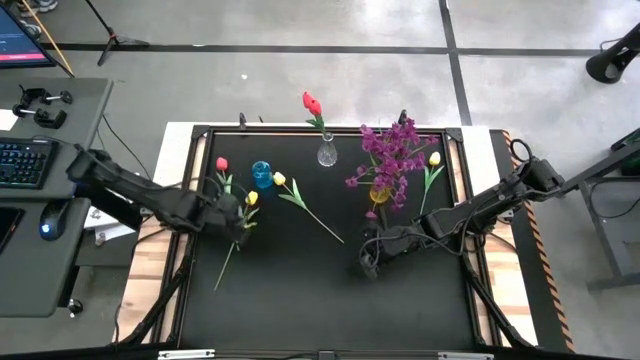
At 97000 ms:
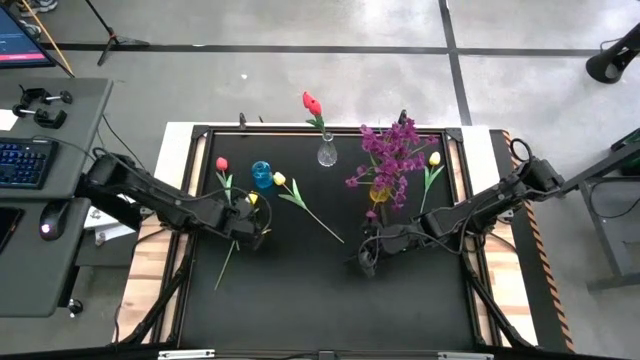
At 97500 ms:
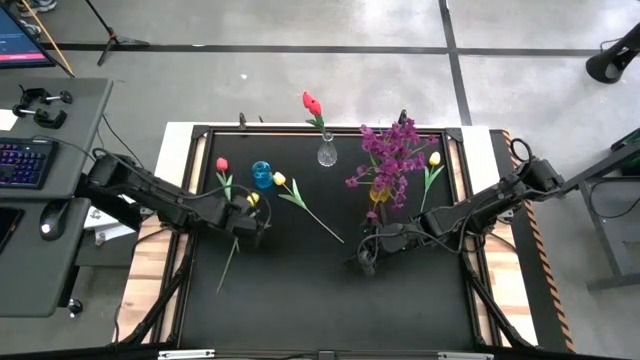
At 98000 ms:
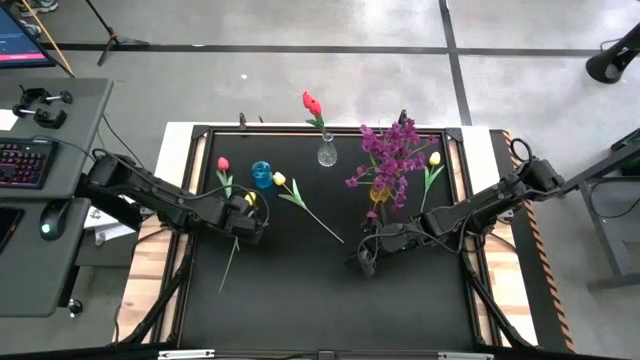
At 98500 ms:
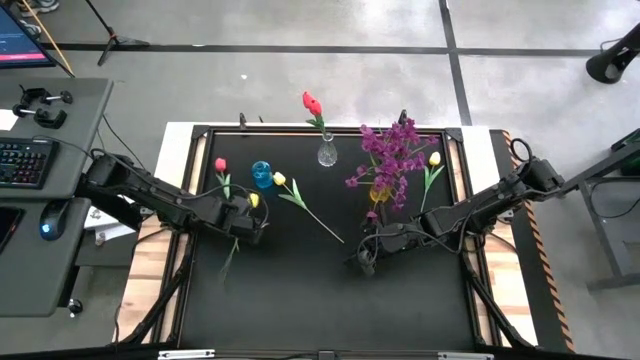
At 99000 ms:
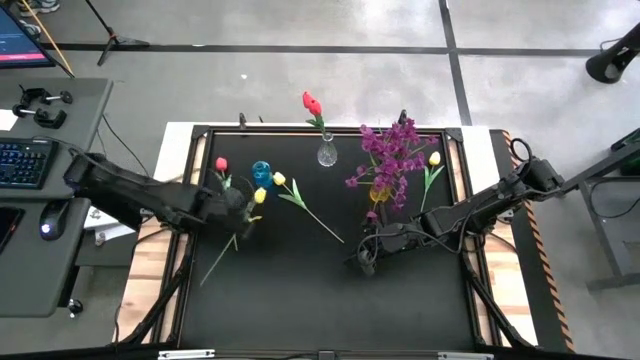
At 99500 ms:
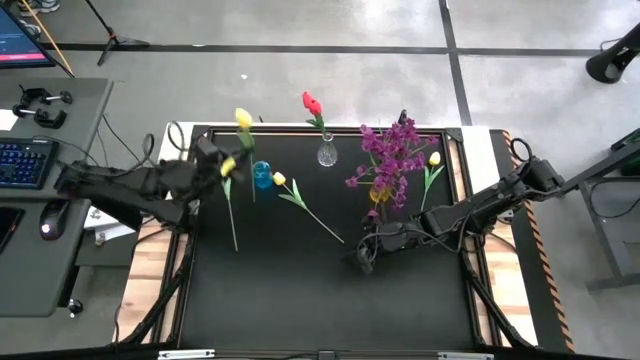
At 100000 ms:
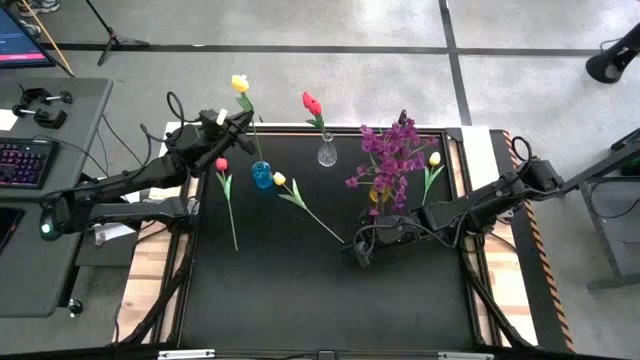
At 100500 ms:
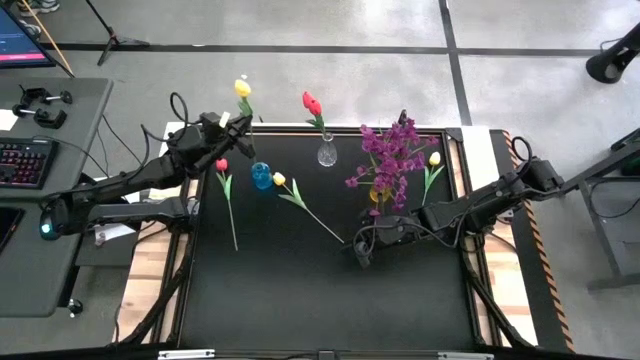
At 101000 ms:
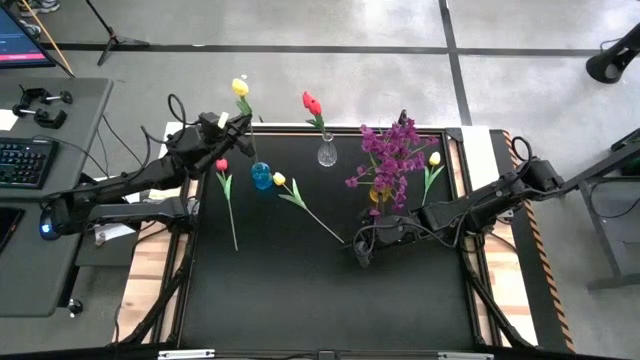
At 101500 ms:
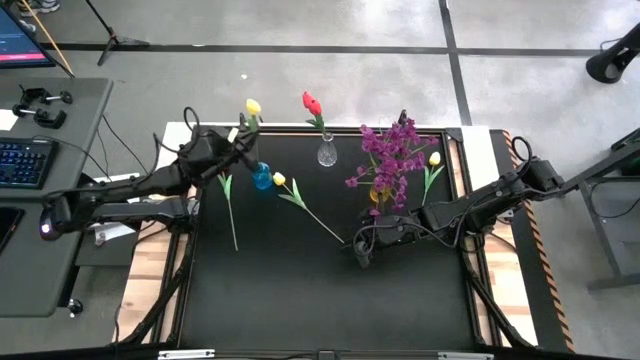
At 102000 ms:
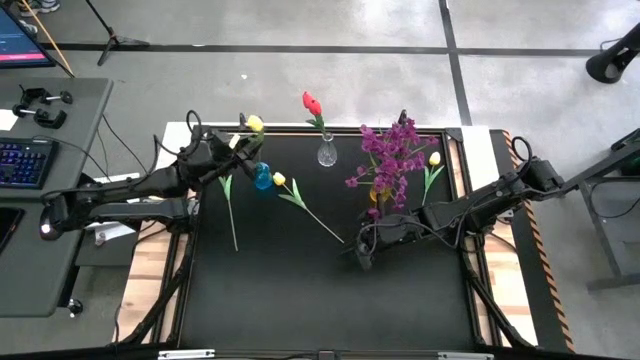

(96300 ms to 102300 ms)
Task: Sort flowers into vase by color
Put the left yellow flower into the blue vase

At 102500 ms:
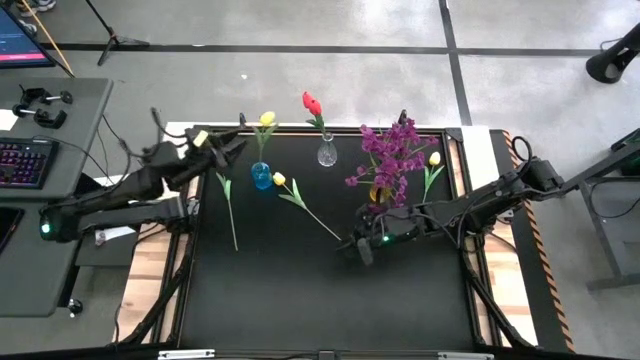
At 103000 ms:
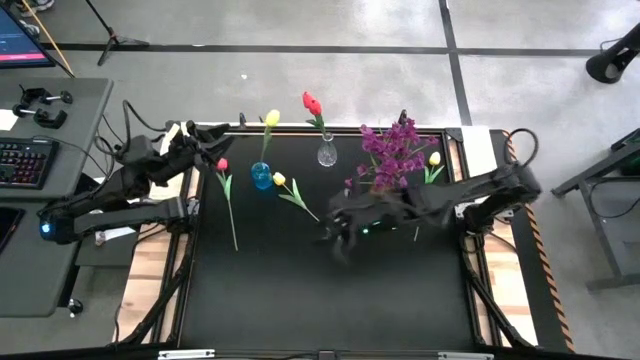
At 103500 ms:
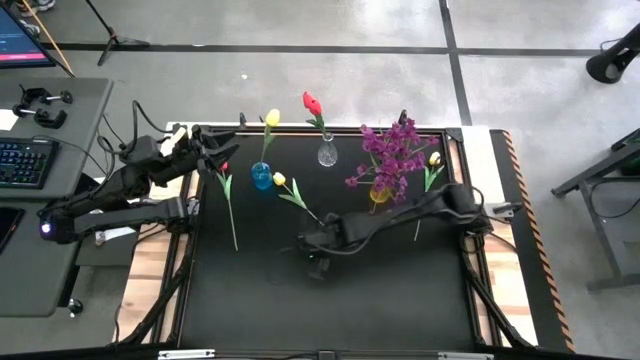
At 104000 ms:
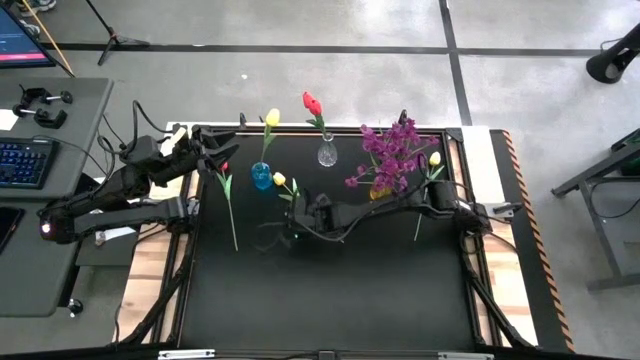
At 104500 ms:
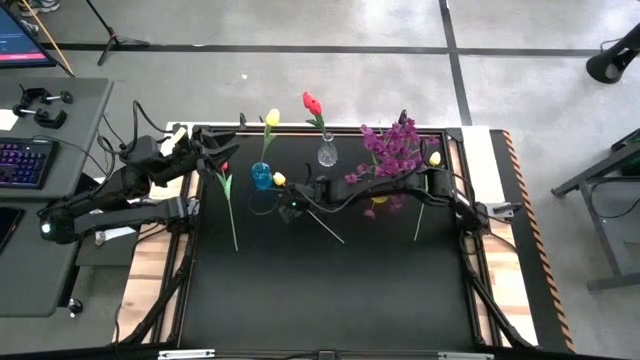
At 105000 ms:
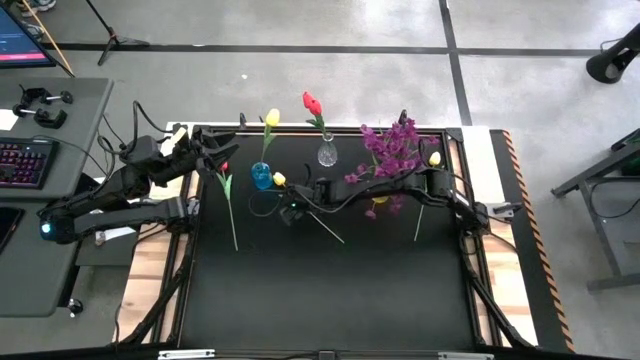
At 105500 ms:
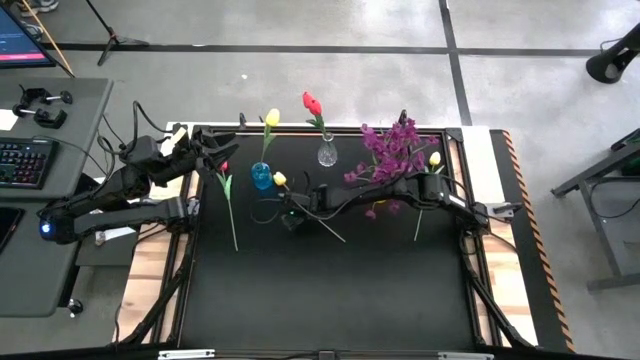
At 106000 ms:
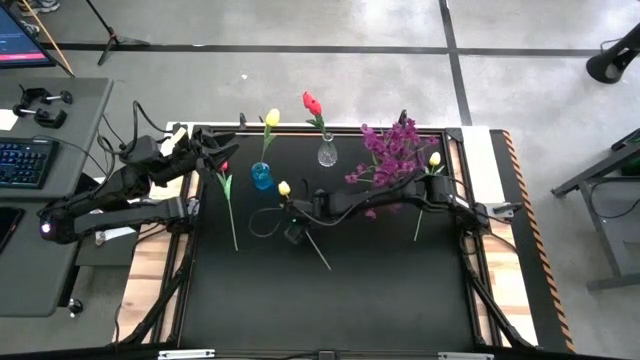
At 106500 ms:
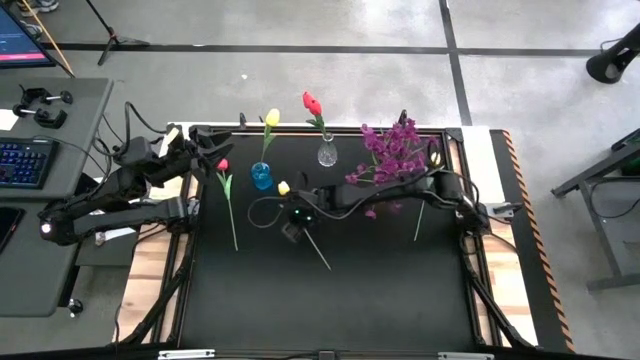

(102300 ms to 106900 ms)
Put the left yellow flower into the blue vase

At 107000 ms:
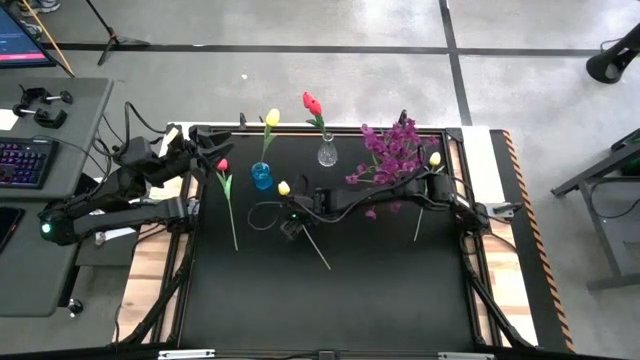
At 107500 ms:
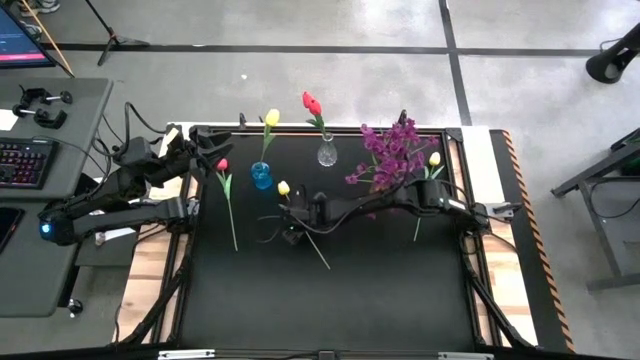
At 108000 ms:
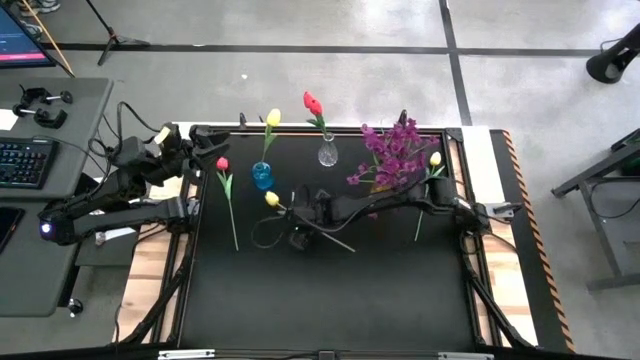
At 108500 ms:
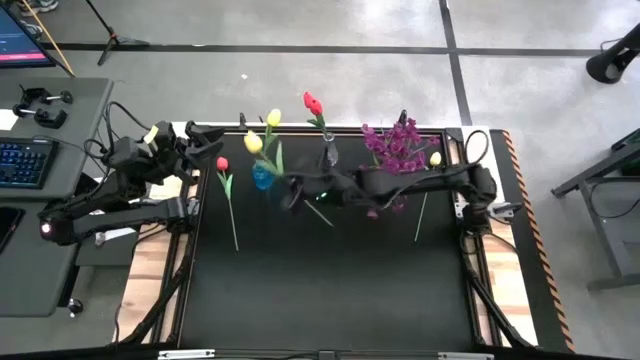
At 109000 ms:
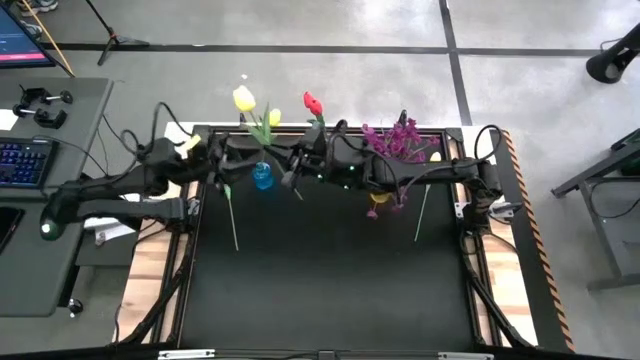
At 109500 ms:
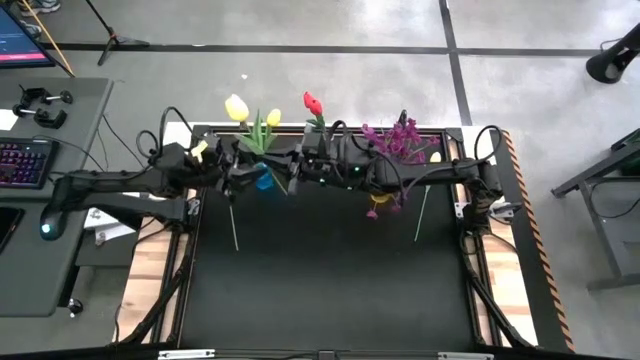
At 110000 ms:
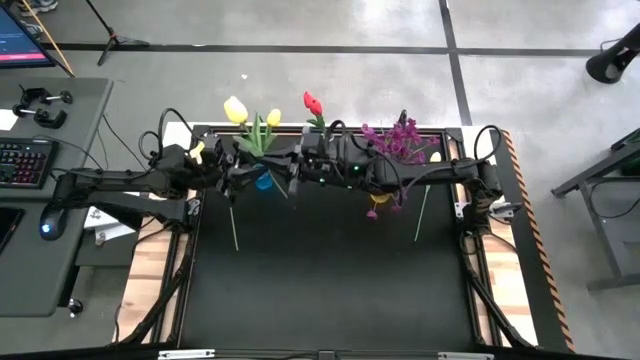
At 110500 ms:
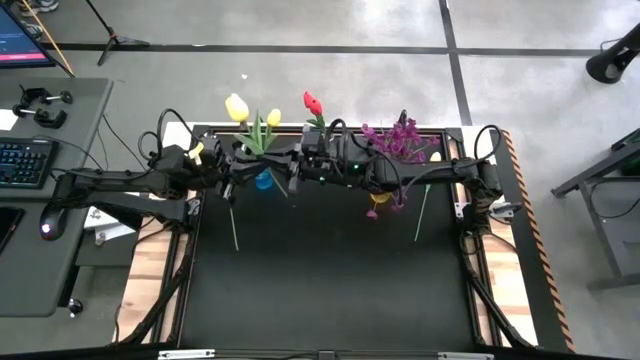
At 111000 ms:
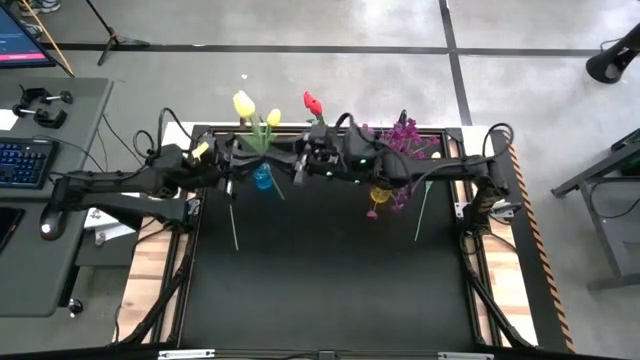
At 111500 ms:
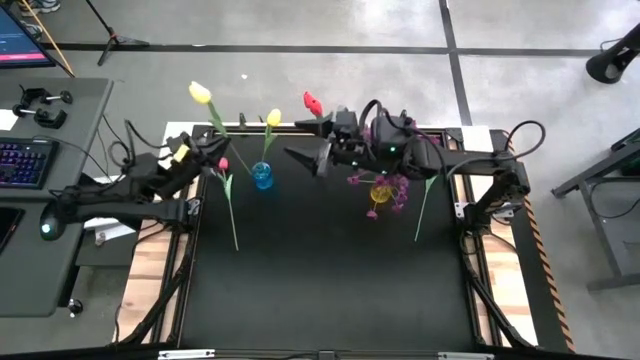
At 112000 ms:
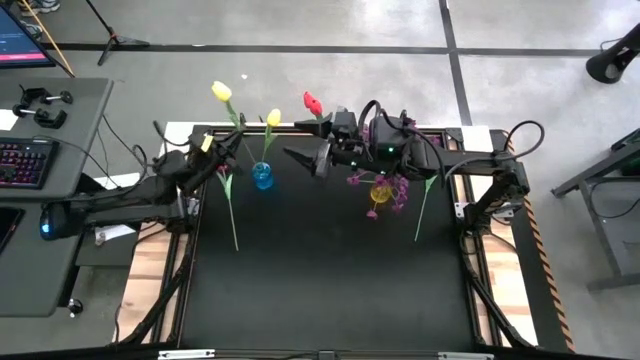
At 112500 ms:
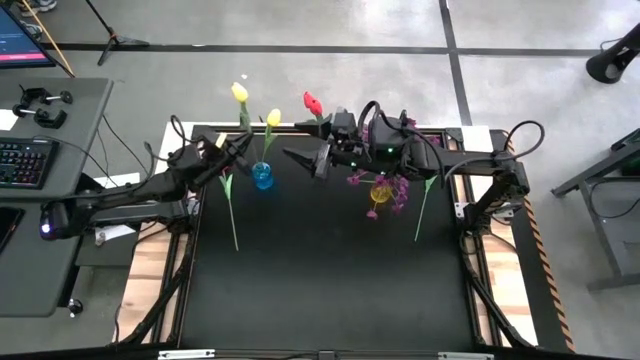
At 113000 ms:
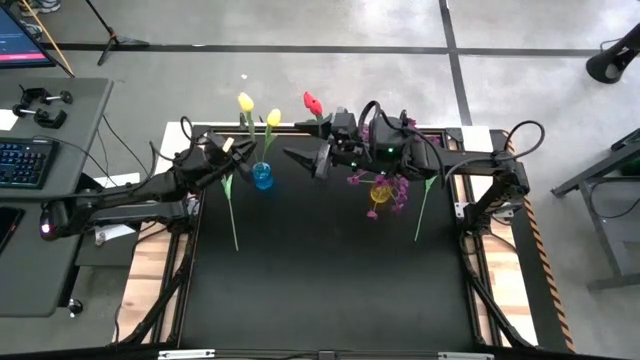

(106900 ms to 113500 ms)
Put the left yellow flower into the blue vase

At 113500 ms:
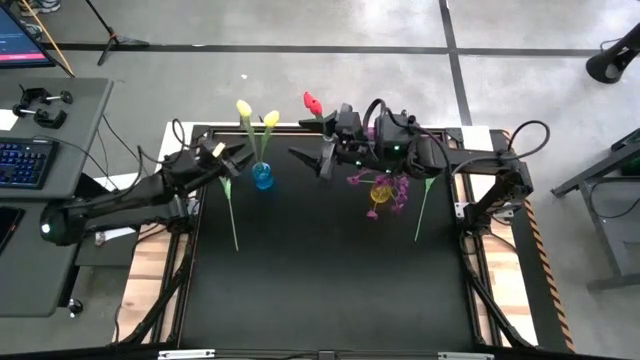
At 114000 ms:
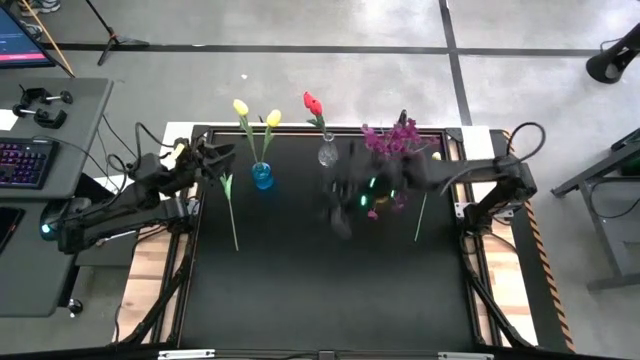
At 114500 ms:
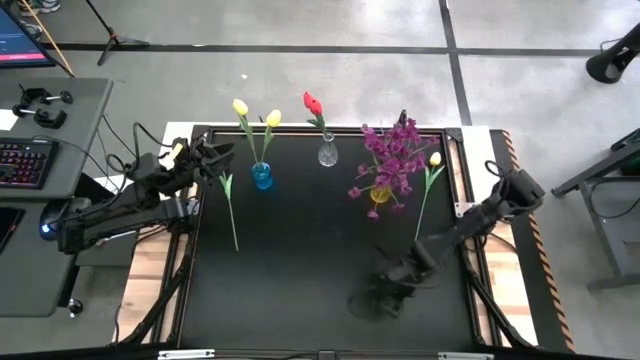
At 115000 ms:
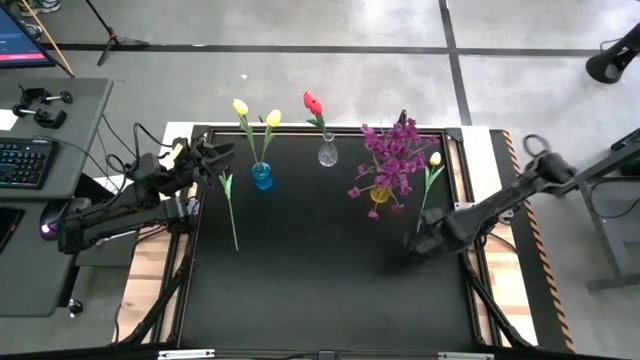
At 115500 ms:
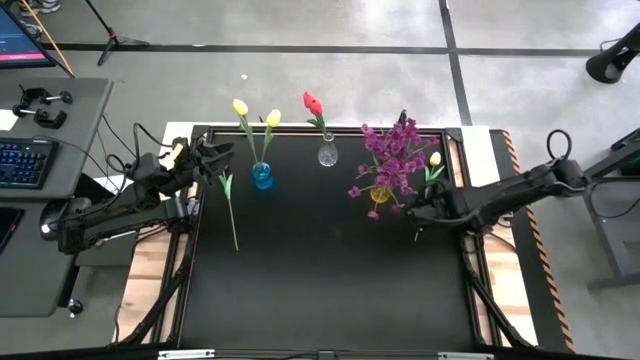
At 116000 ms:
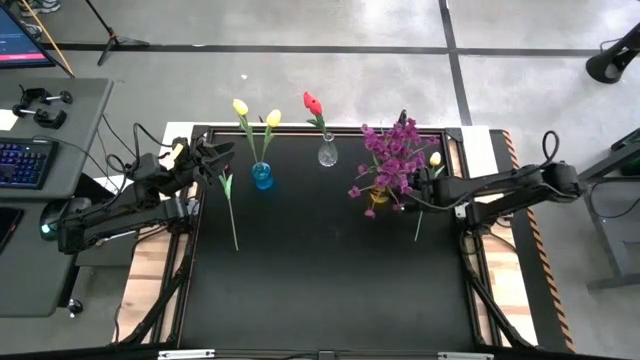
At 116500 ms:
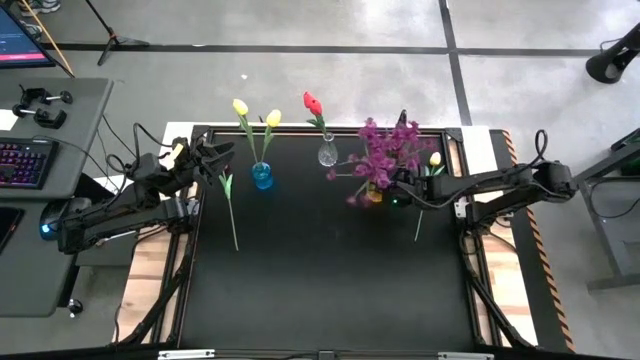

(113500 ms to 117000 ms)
Adjust the yellow vase
